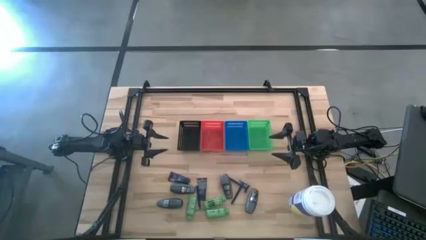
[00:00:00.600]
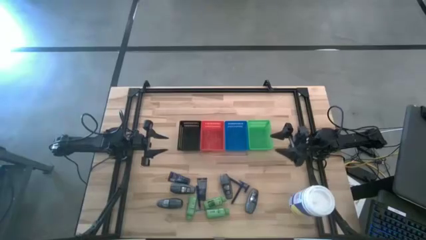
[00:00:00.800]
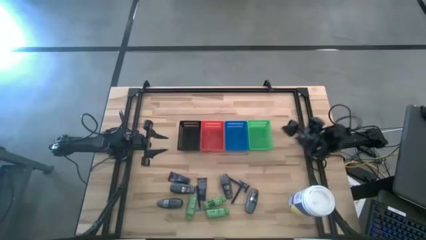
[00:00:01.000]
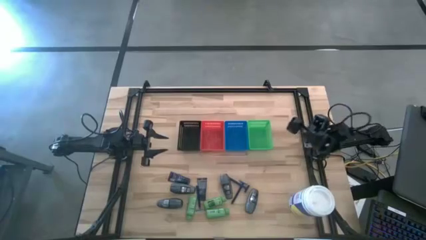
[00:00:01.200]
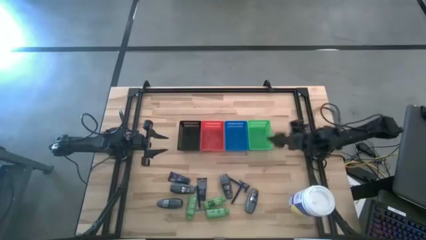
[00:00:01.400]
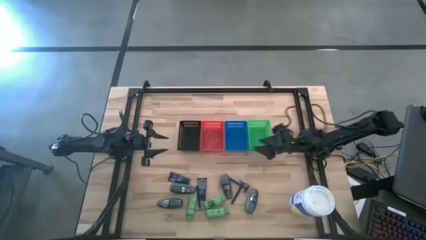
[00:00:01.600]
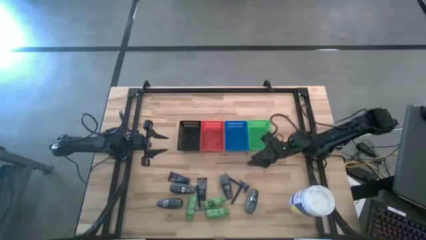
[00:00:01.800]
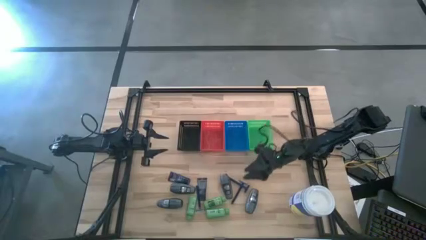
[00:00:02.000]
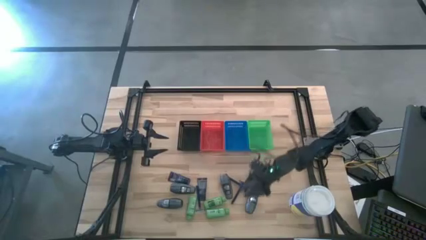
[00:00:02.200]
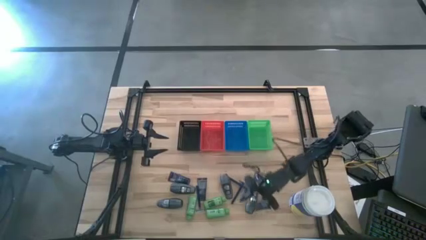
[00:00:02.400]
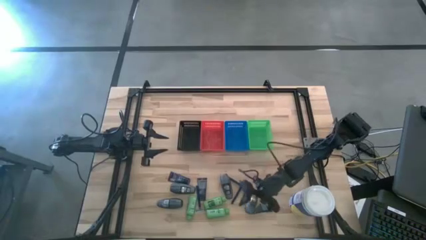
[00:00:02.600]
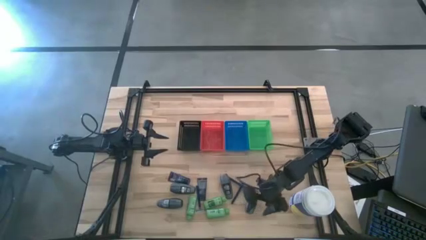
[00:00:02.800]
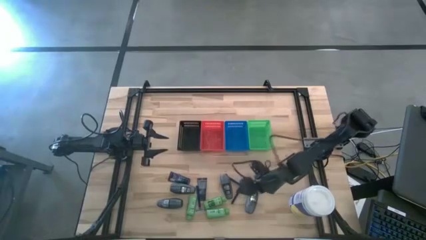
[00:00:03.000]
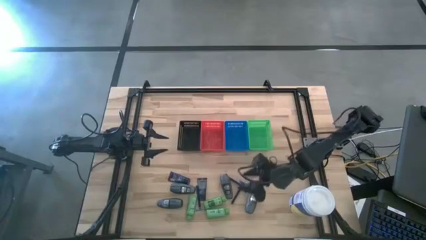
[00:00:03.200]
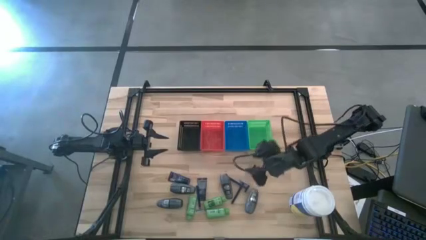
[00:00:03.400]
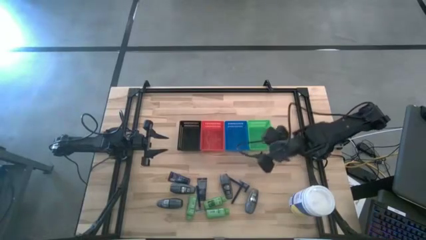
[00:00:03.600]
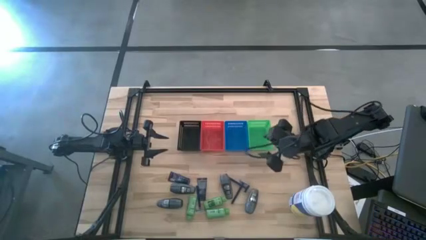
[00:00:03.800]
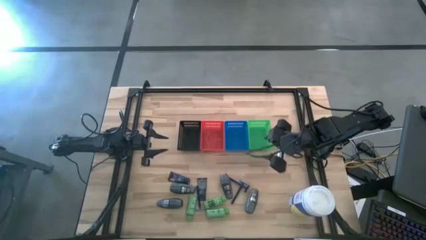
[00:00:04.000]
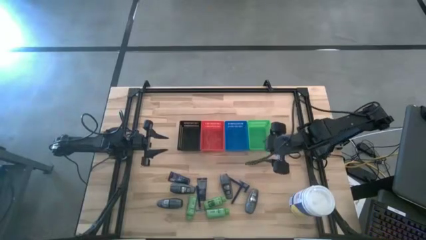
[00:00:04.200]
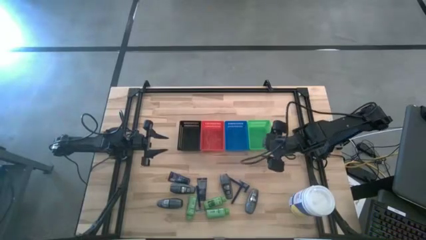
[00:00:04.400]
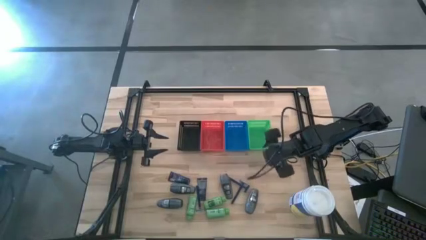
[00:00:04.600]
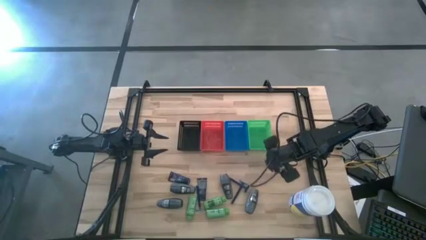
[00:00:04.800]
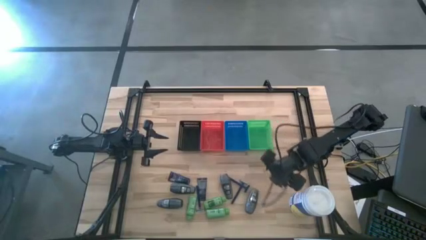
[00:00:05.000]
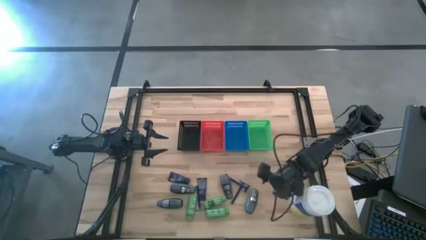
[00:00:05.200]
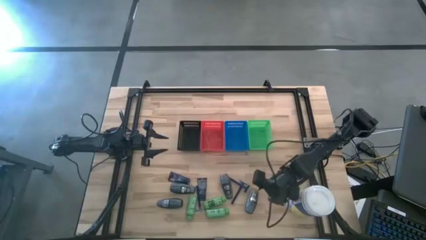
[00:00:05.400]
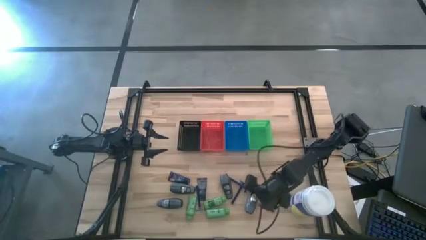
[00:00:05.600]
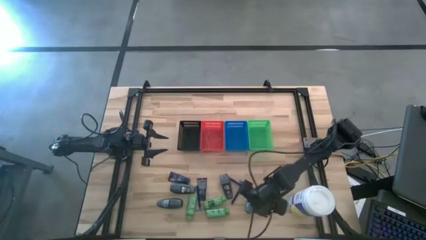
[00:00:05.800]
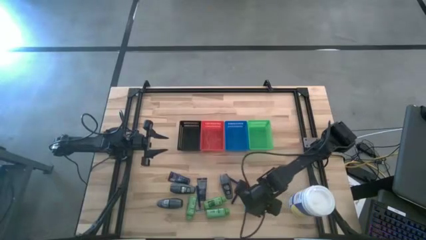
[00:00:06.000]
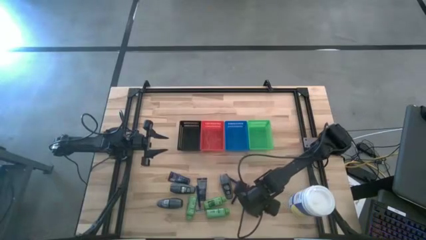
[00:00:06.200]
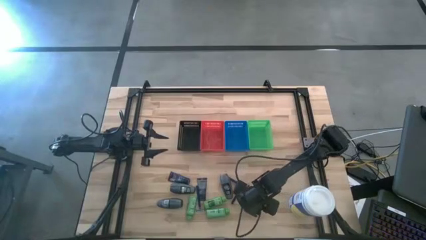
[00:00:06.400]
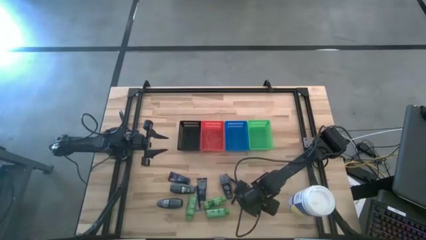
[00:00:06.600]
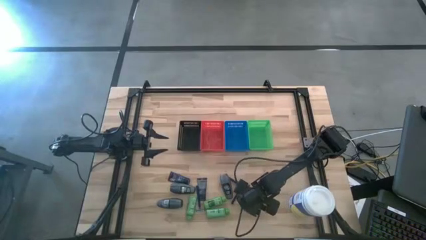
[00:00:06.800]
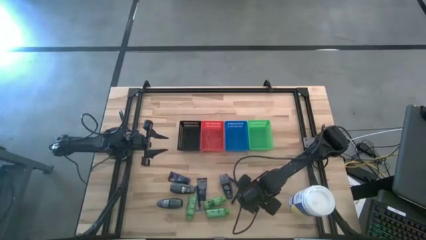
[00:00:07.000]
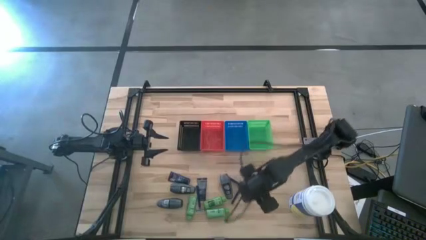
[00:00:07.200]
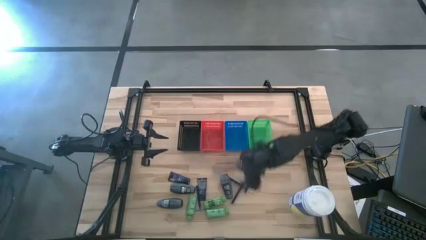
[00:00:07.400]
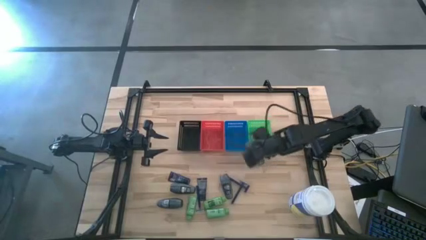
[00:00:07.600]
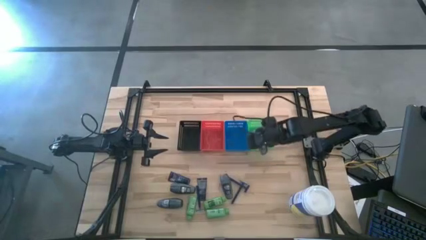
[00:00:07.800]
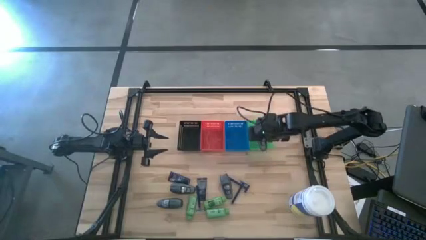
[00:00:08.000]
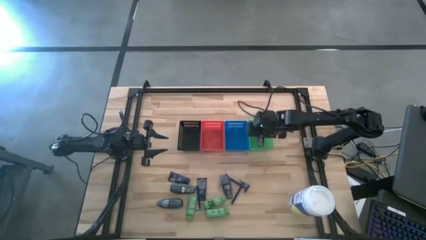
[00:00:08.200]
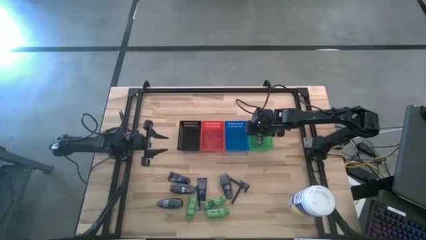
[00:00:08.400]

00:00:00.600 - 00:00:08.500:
Task: Pick & Place Travel size toiletries
Put the black deodorant into the green basket

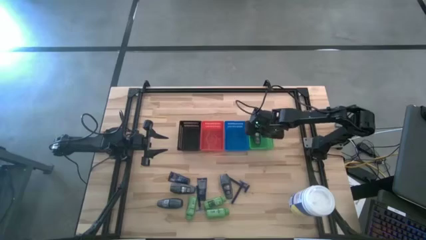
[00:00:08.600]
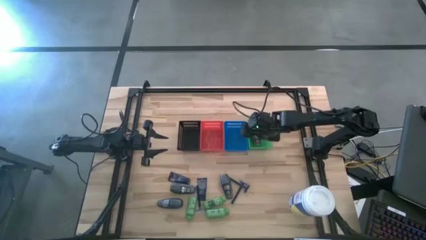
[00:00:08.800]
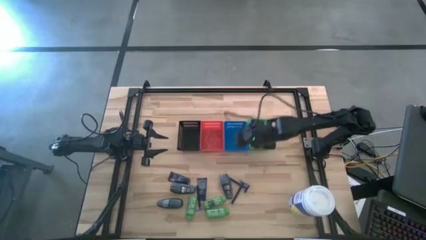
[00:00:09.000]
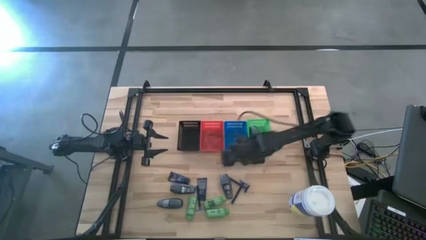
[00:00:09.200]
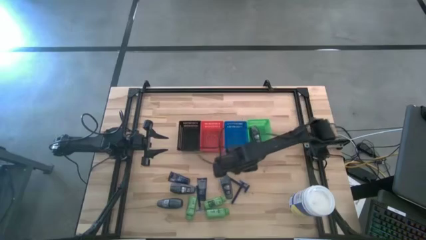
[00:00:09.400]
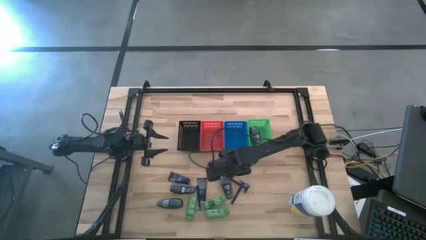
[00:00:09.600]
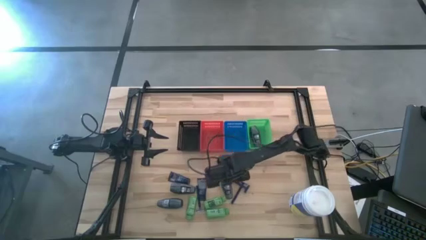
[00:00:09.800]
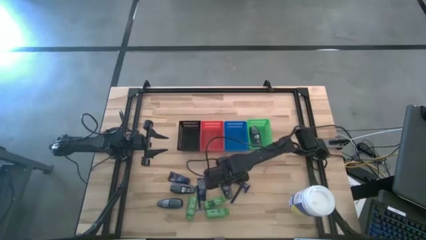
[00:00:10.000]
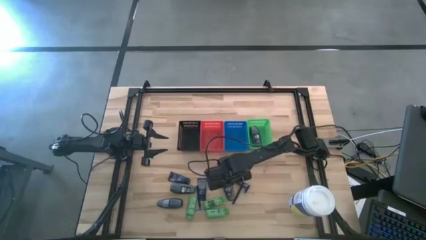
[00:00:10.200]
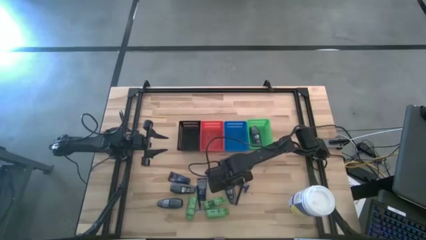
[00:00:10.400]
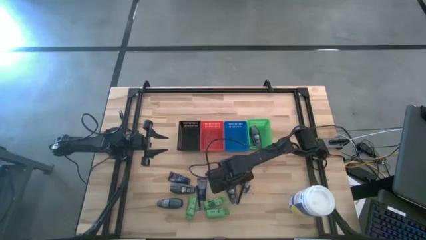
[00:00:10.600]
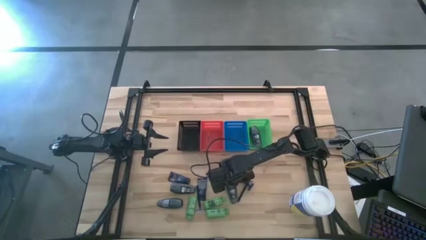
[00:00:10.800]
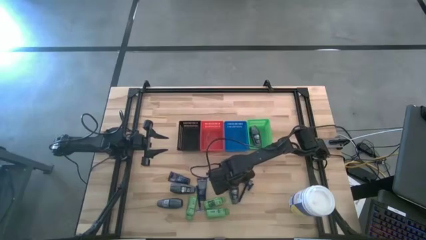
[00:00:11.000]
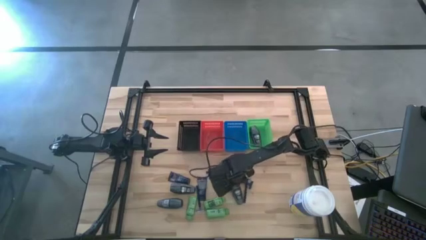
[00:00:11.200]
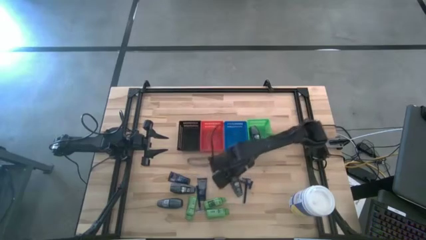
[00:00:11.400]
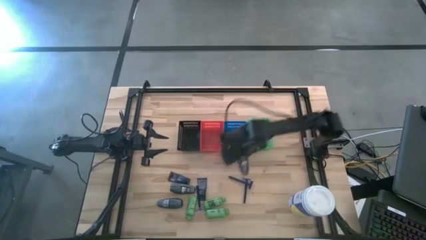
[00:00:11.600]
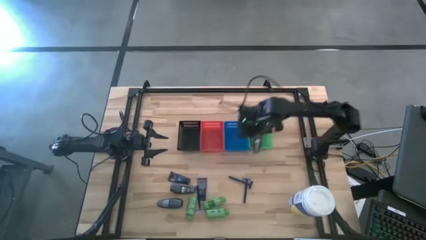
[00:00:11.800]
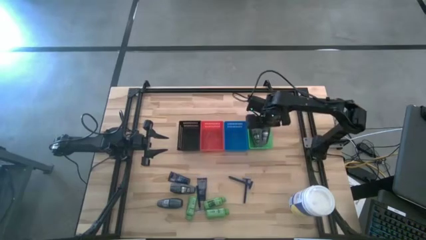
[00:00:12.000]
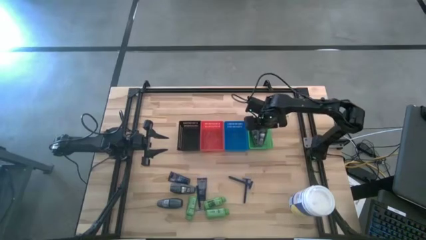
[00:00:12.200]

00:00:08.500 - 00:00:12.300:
Put the black deodorant into the green basket

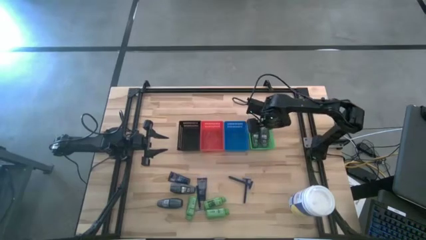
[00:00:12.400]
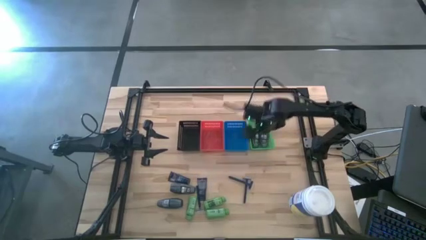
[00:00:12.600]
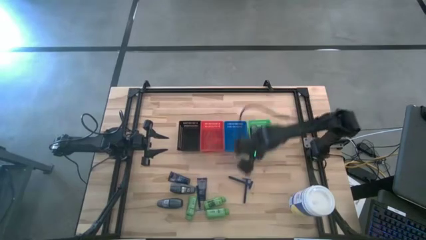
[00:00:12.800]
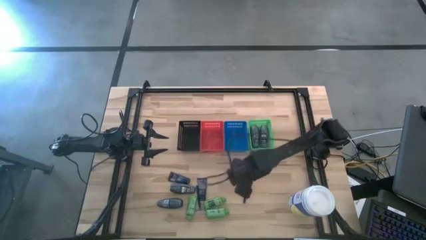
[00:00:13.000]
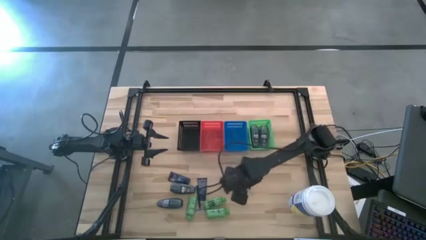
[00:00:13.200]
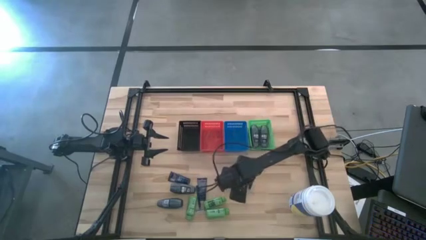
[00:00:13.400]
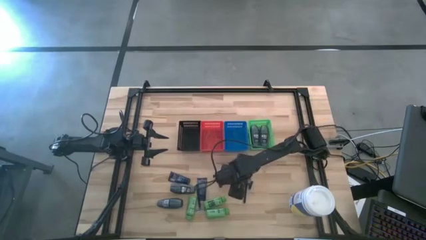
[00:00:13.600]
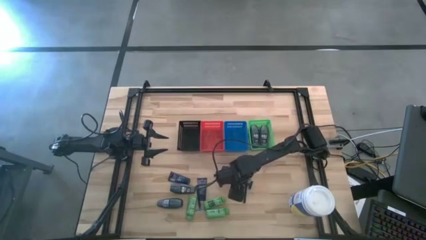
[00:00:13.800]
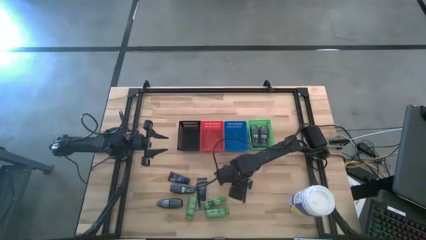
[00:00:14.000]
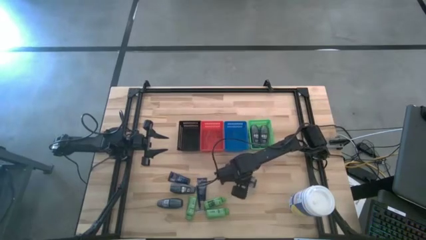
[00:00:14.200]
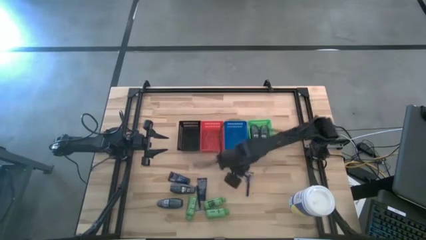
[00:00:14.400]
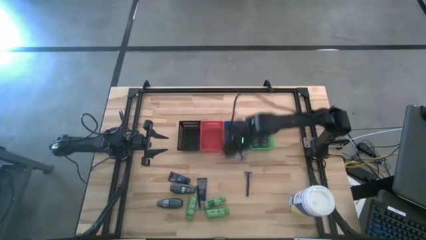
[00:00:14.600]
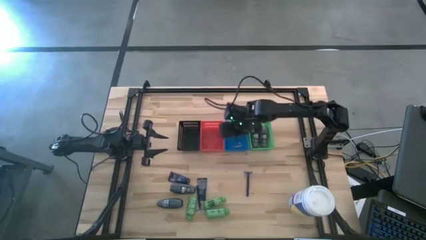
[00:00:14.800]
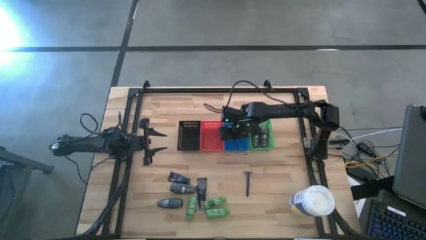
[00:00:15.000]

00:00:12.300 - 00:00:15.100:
Put the blue razor into the blue basket

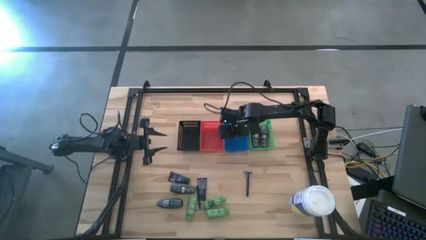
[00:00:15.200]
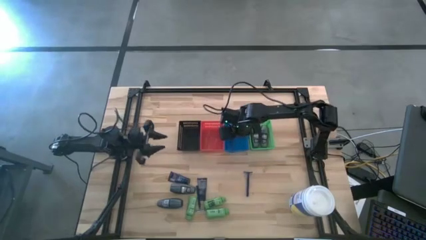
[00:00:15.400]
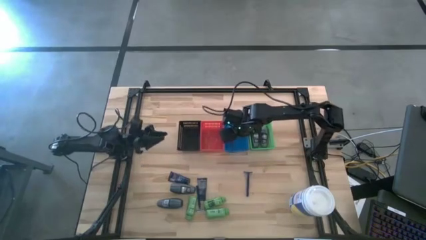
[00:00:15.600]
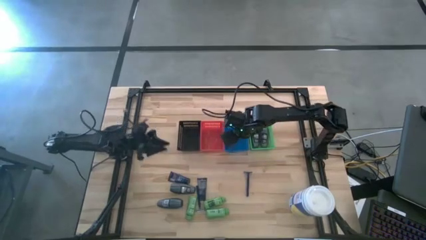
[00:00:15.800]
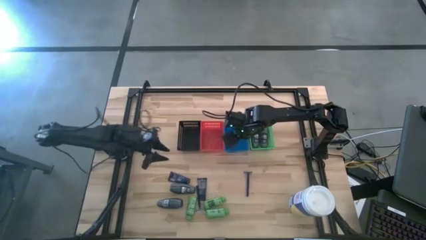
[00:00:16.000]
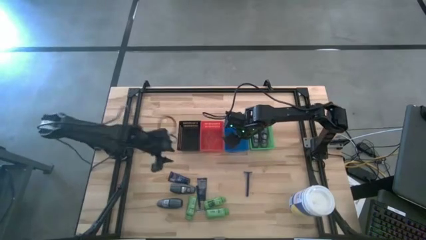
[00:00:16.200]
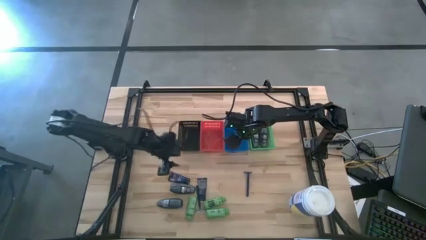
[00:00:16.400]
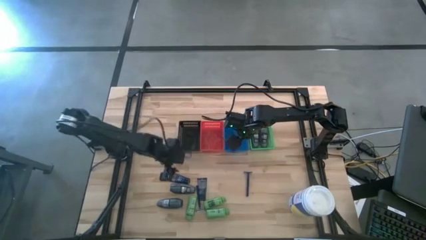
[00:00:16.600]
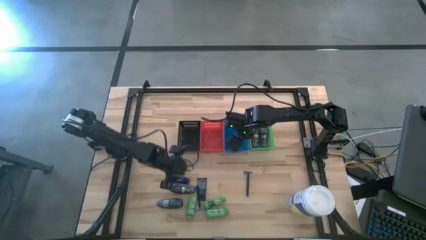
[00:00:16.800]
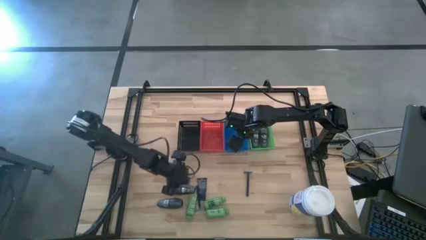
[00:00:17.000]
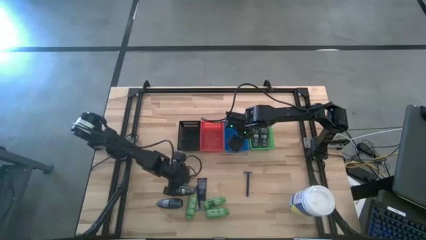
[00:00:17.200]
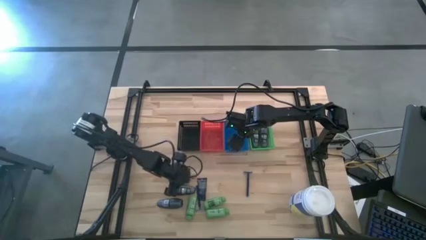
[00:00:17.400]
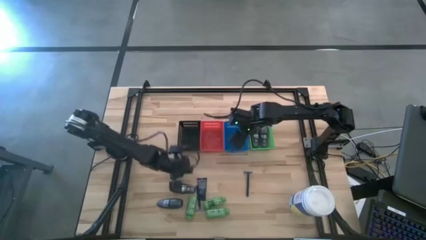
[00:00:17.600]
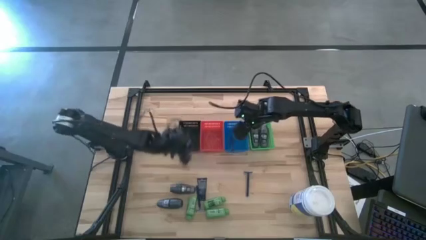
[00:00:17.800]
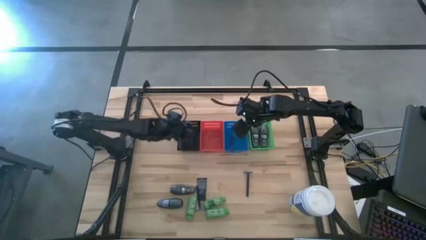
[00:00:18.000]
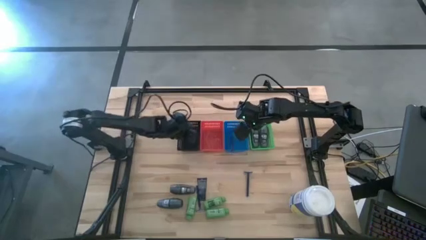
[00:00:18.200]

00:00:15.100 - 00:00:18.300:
Put the blue shaving cream into the black basket
